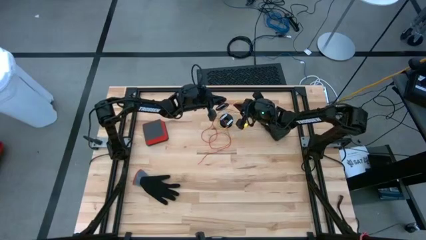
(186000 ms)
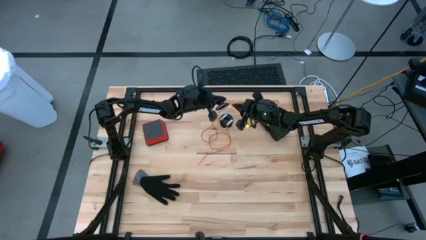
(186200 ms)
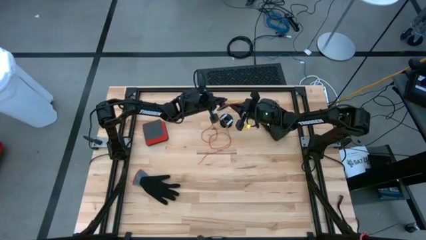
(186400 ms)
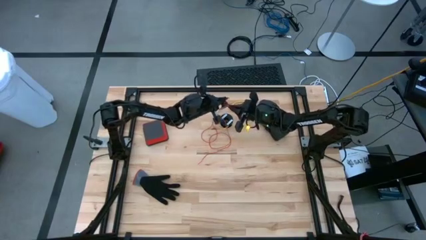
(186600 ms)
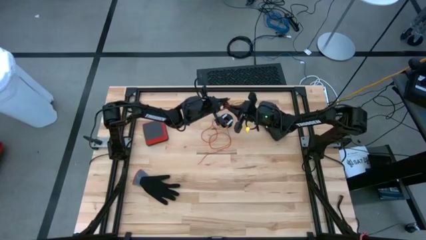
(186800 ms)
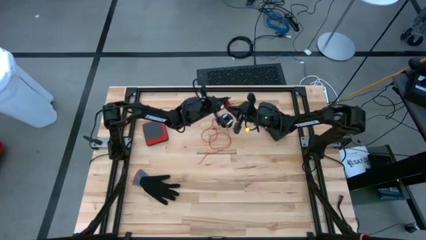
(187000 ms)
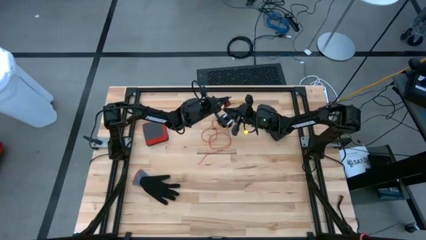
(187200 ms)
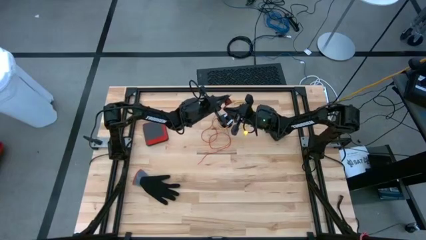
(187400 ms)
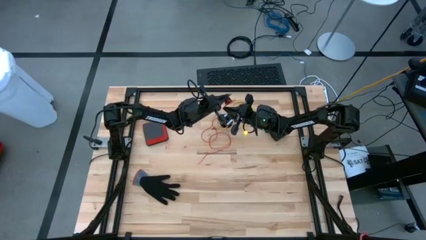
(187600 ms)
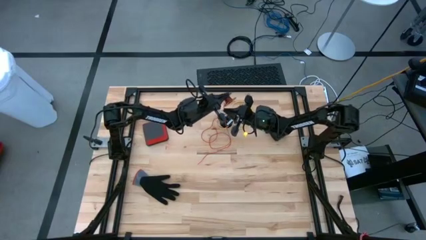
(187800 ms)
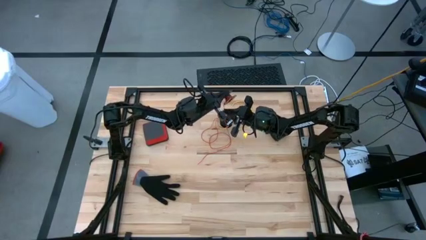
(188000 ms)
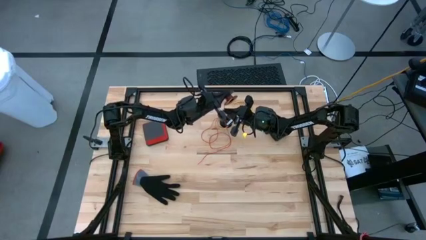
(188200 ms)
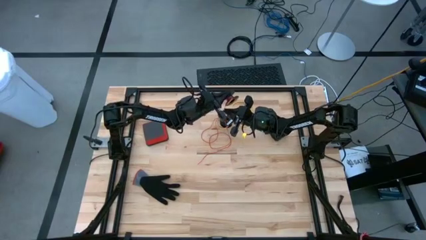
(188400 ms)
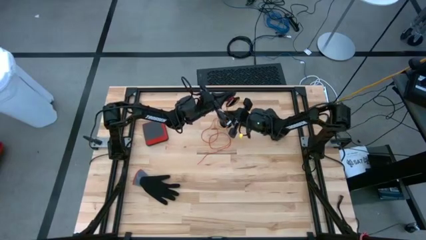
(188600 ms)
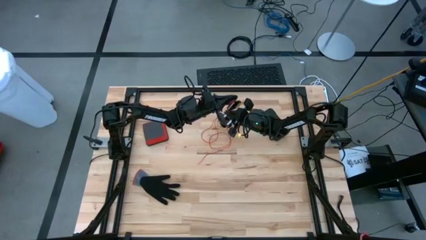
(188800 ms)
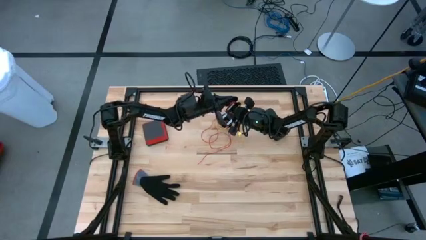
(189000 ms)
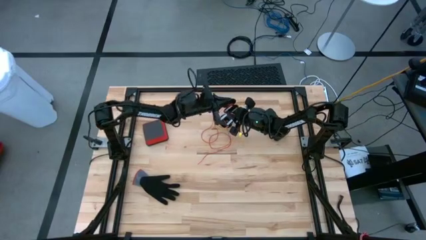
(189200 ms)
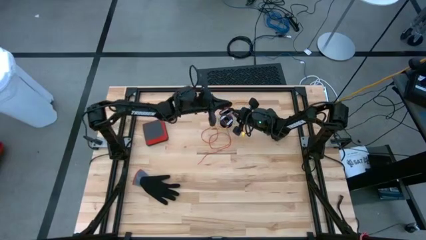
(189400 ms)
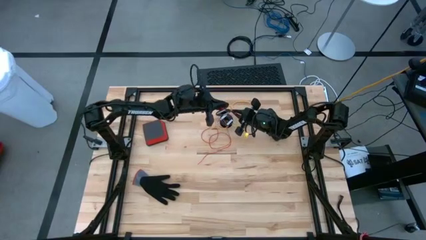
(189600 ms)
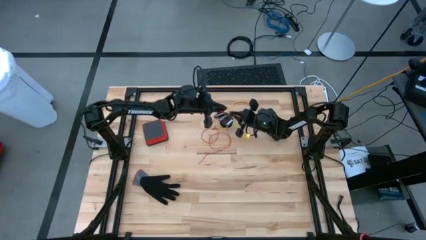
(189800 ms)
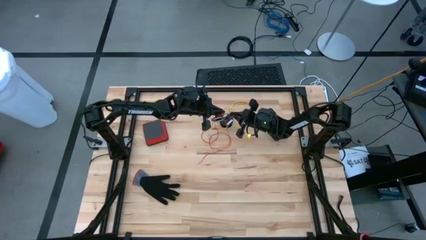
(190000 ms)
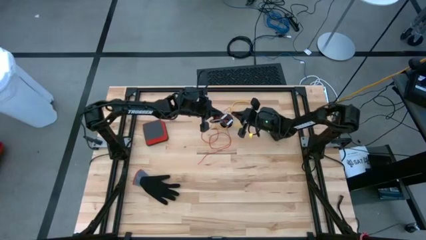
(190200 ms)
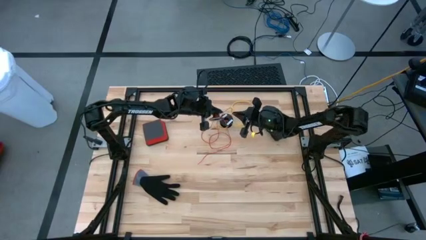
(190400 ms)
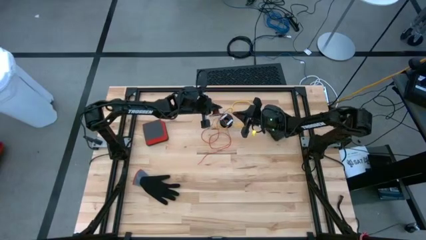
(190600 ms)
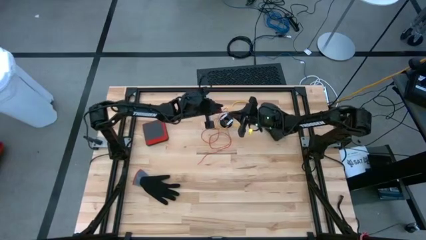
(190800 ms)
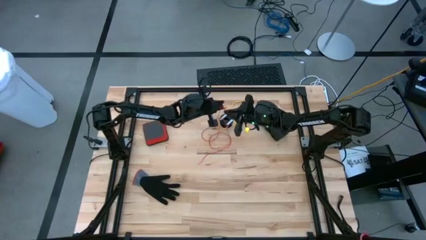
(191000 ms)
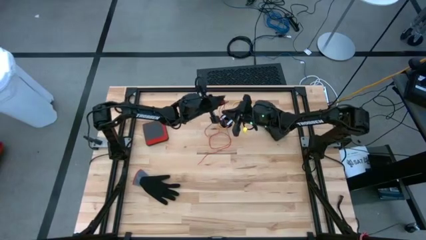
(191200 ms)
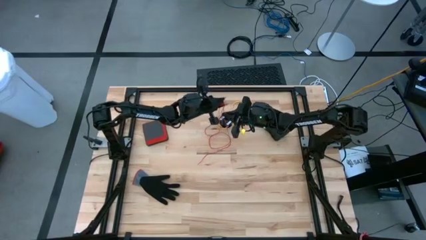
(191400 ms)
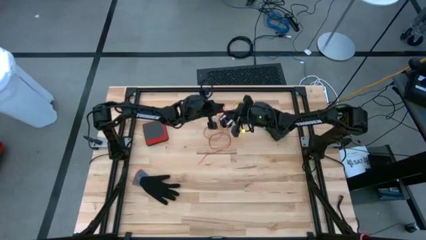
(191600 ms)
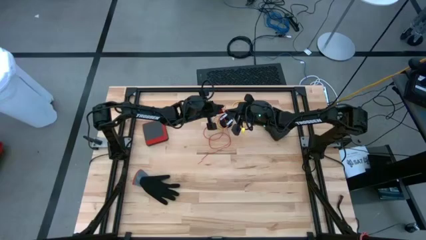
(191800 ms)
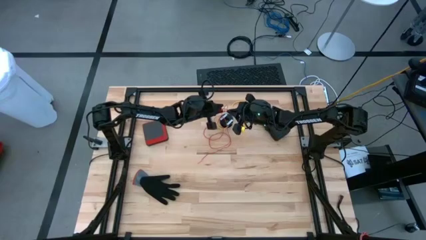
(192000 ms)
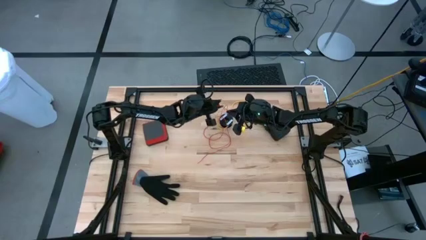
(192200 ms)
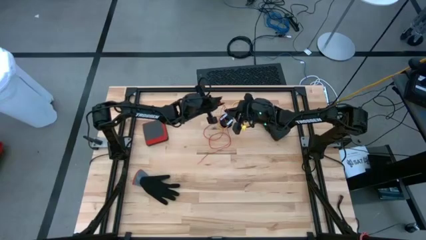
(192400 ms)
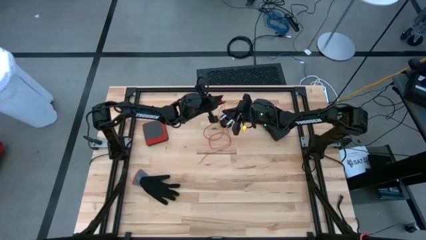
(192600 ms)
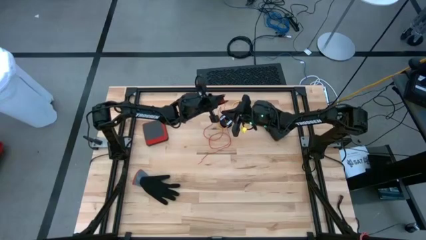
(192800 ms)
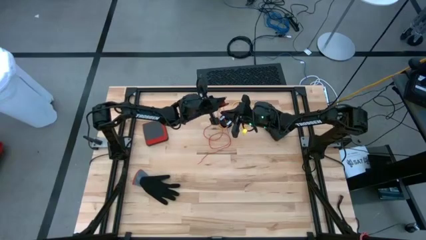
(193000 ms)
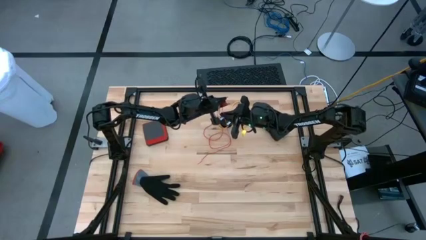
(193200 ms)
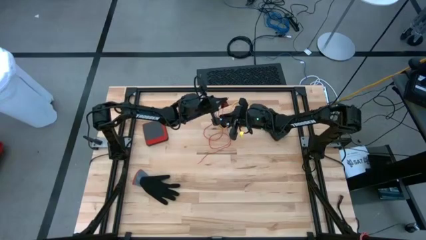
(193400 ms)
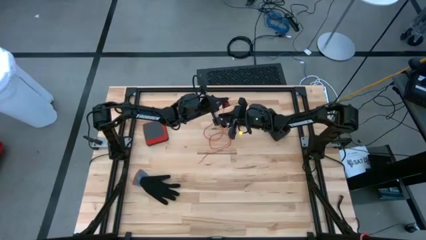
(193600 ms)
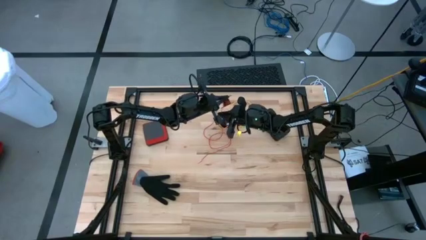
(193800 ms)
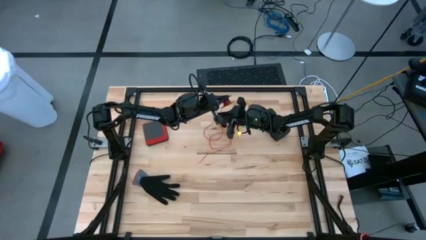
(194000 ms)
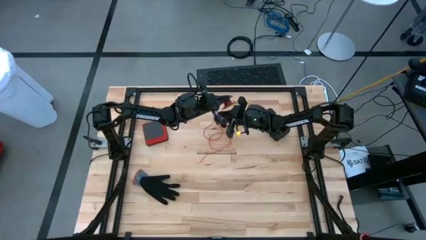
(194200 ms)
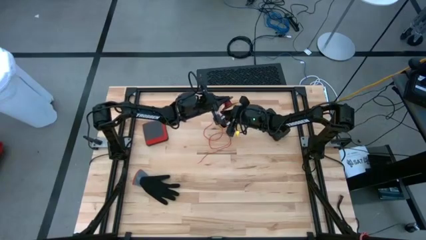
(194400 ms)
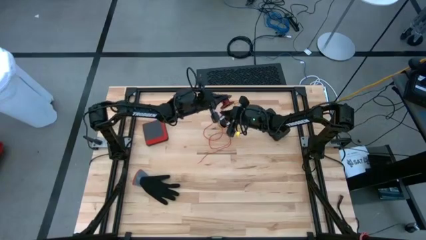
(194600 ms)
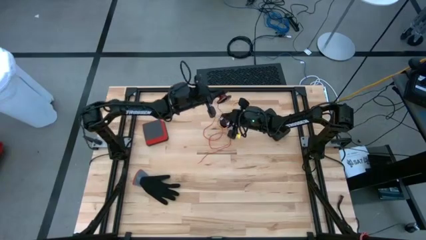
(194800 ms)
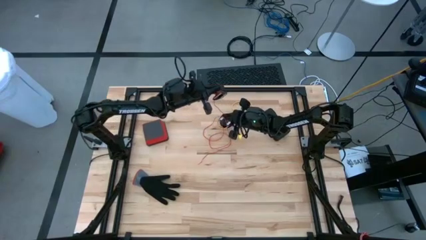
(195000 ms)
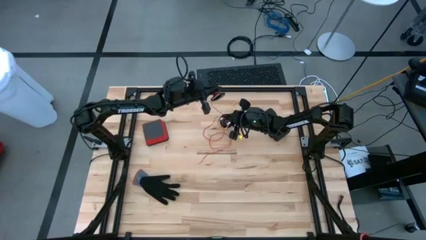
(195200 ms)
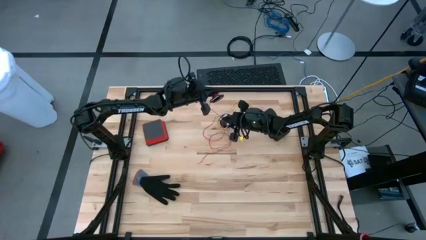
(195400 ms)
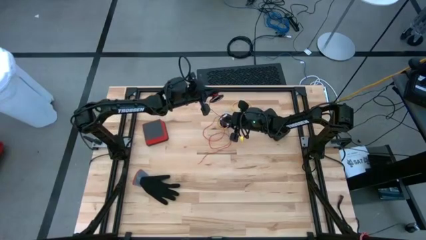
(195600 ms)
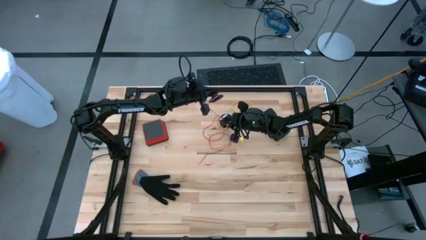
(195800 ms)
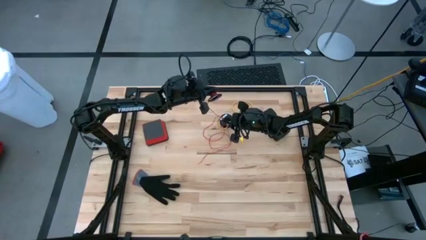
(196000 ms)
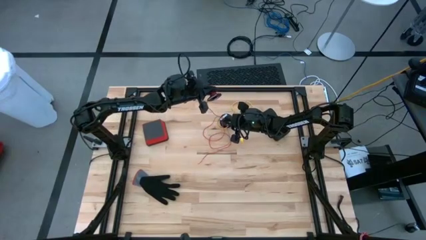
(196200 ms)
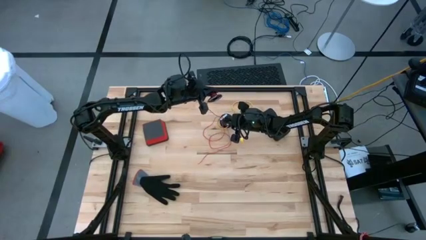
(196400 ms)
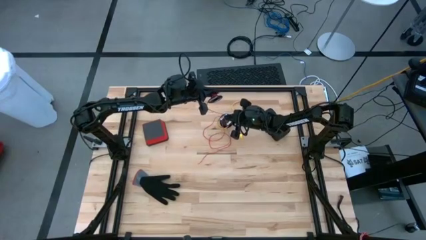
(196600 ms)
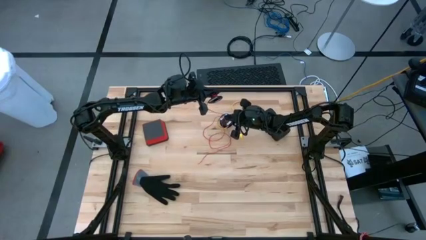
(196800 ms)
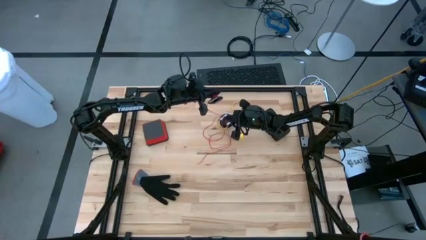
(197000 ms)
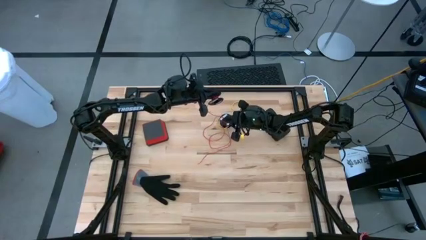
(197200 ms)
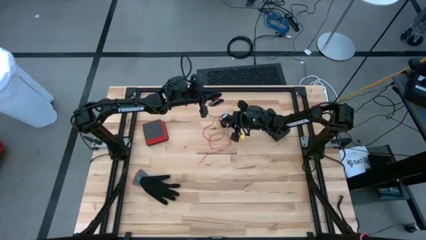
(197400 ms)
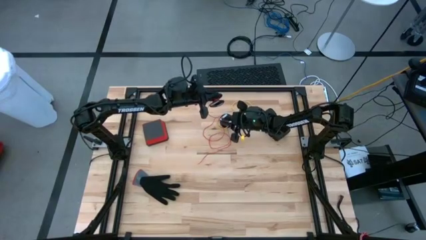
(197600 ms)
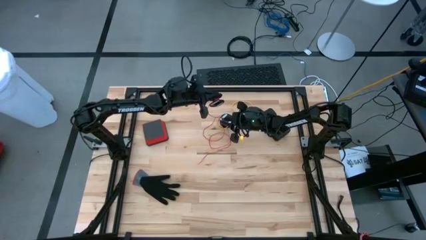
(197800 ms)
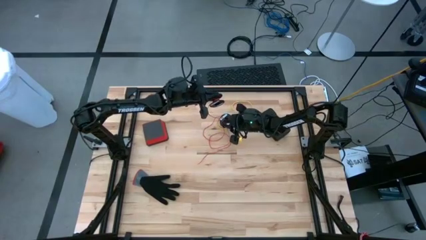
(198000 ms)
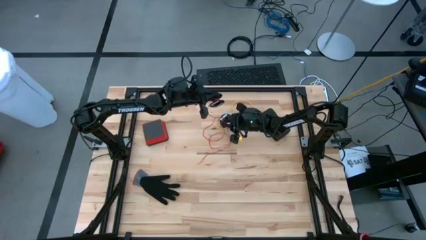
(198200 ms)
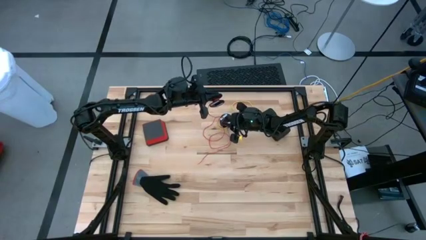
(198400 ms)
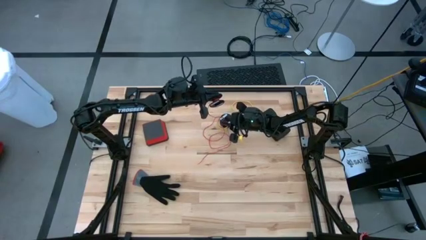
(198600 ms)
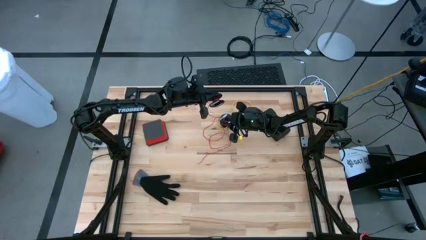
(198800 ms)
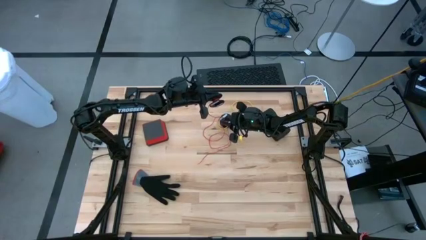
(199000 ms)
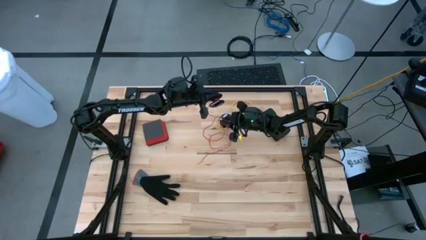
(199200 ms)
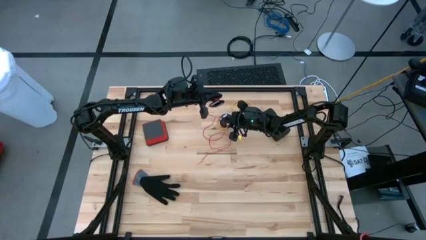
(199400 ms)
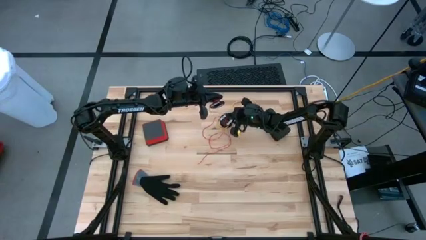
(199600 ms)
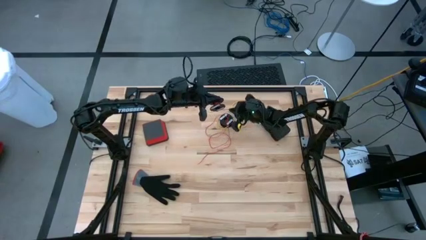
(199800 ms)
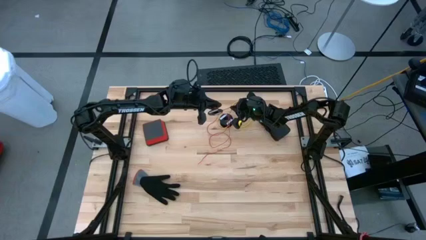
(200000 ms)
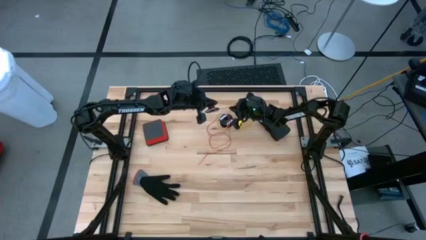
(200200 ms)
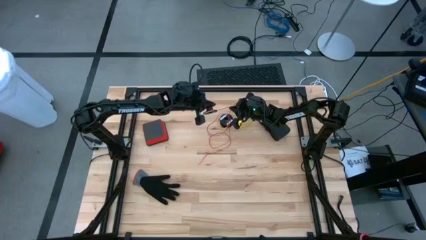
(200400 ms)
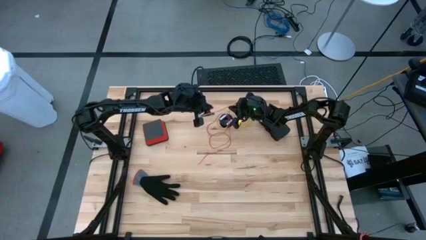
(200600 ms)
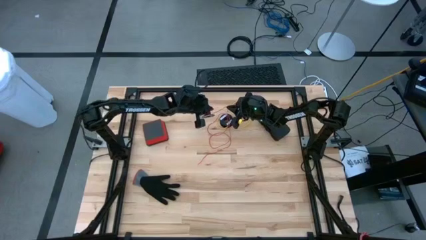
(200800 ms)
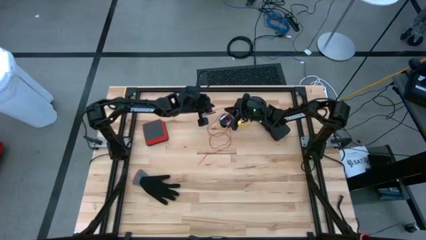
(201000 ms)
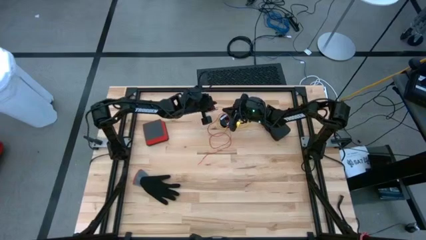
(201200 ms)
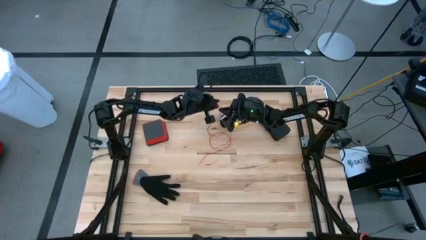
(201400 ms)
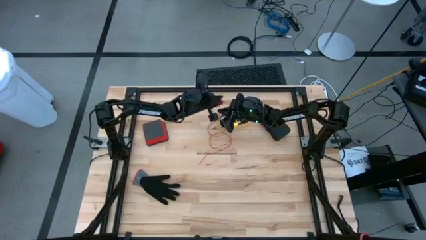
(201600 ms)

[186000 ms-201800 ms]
Task: Coil cords
Coil the red wire into the spool
